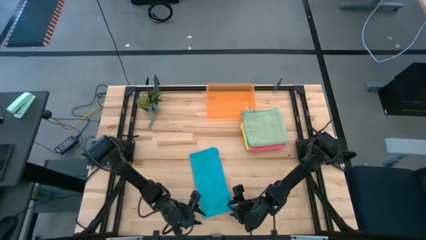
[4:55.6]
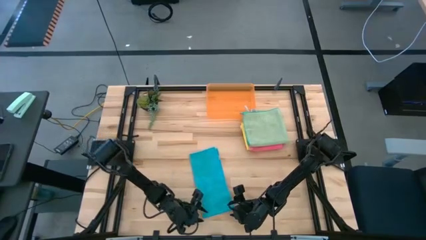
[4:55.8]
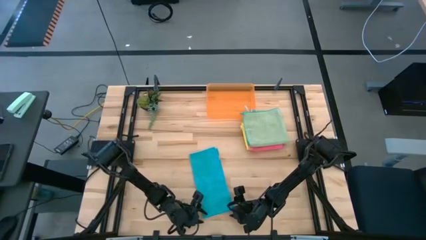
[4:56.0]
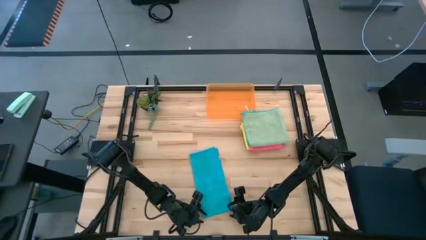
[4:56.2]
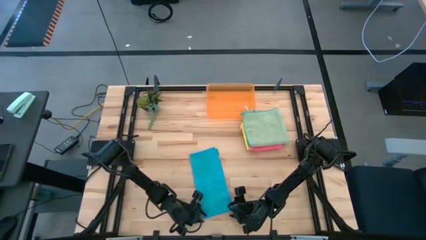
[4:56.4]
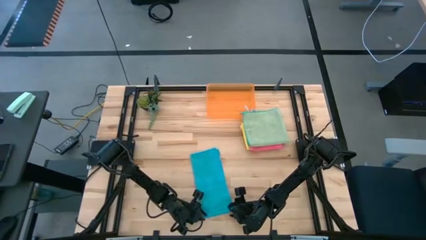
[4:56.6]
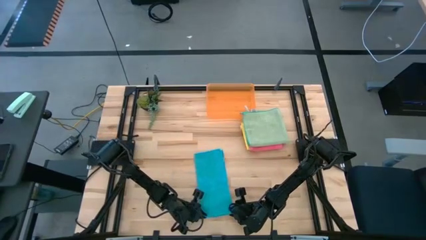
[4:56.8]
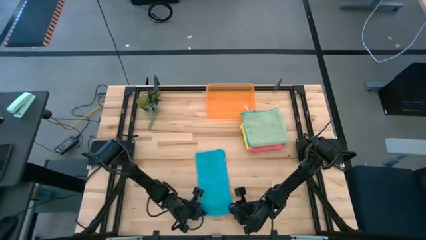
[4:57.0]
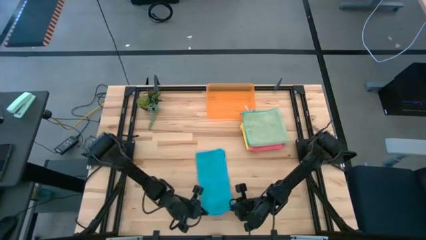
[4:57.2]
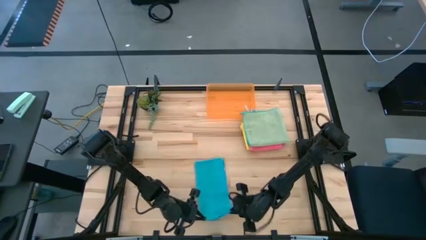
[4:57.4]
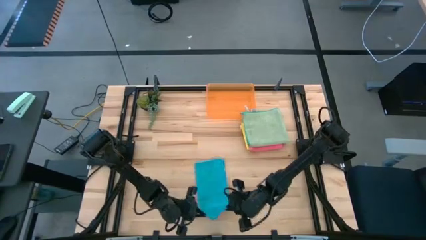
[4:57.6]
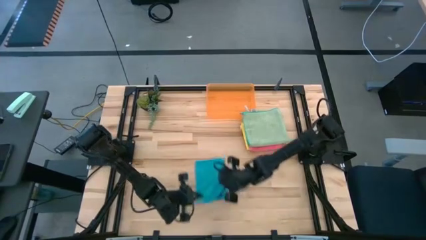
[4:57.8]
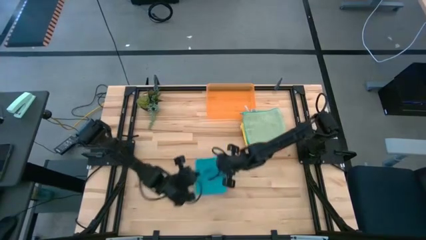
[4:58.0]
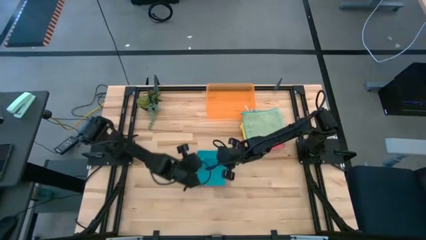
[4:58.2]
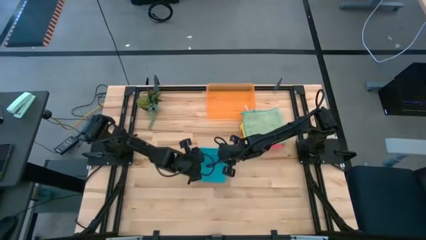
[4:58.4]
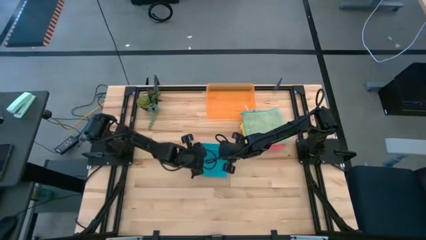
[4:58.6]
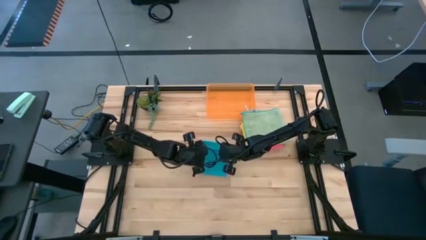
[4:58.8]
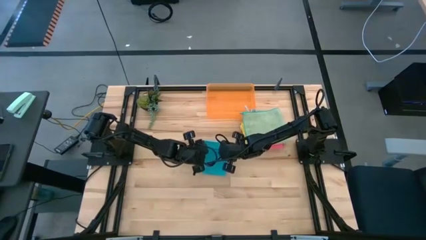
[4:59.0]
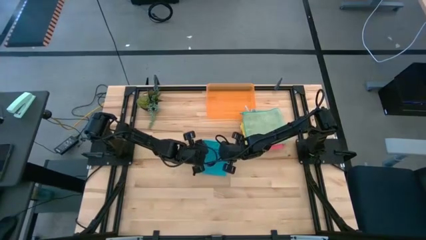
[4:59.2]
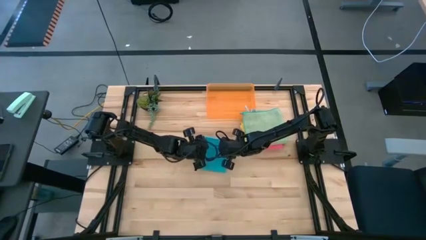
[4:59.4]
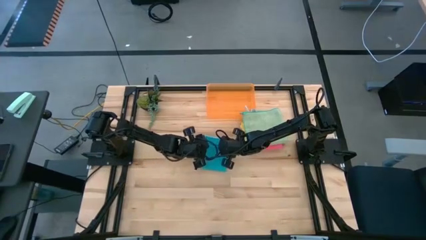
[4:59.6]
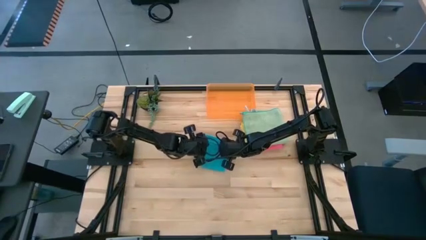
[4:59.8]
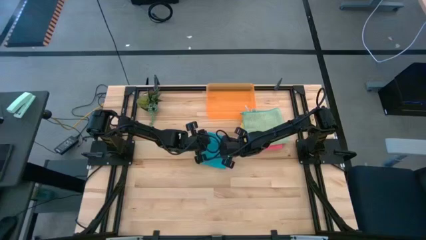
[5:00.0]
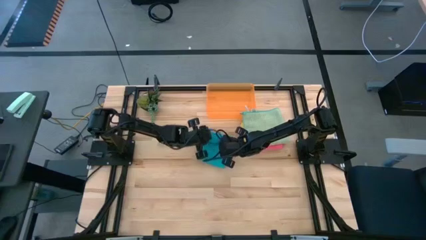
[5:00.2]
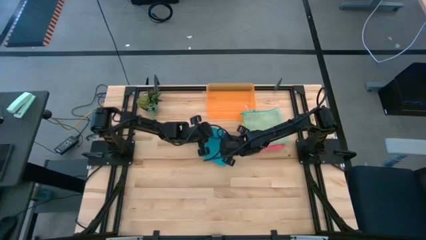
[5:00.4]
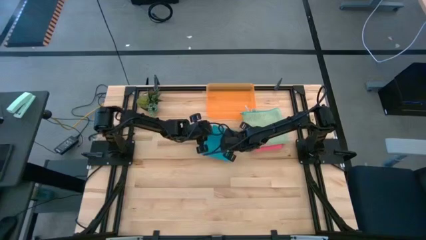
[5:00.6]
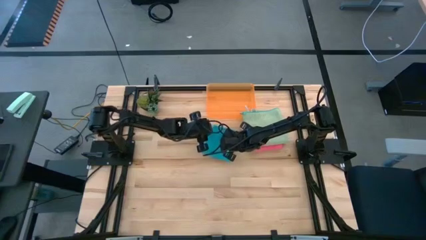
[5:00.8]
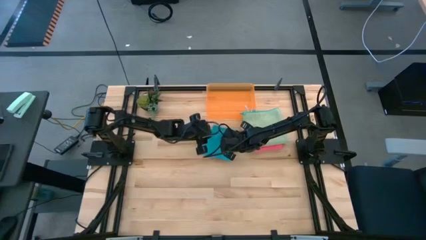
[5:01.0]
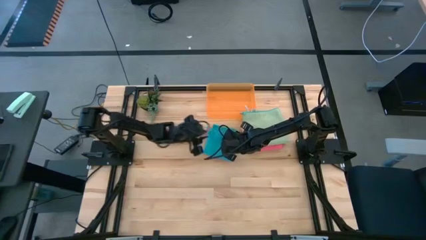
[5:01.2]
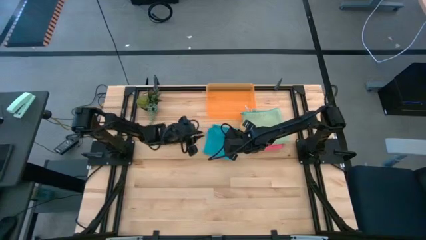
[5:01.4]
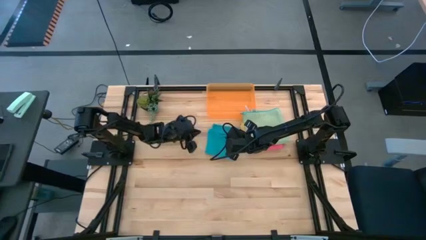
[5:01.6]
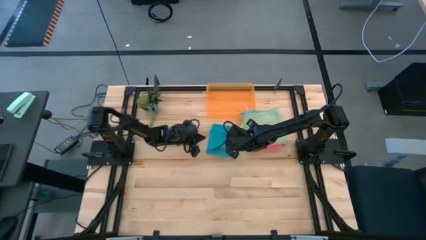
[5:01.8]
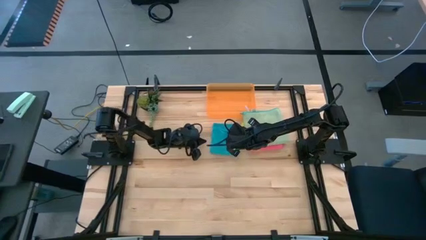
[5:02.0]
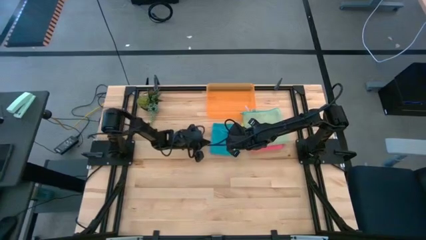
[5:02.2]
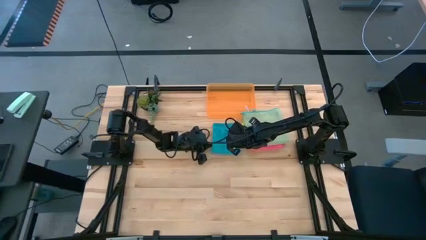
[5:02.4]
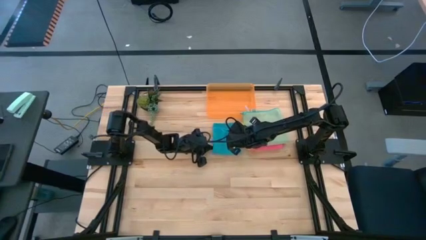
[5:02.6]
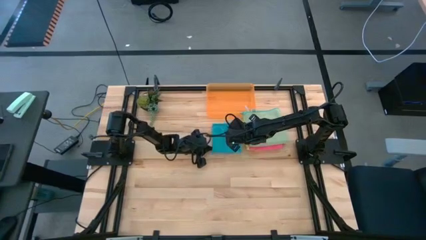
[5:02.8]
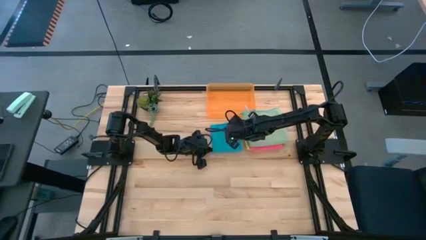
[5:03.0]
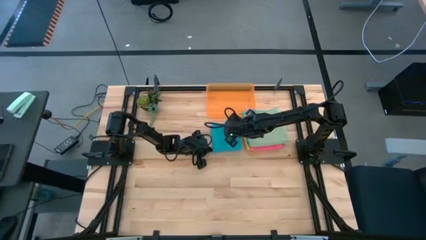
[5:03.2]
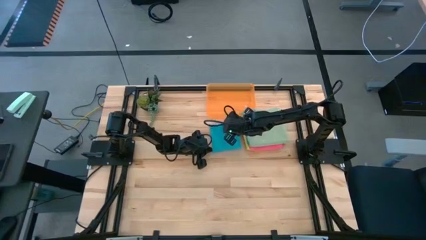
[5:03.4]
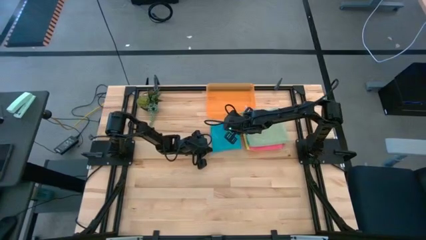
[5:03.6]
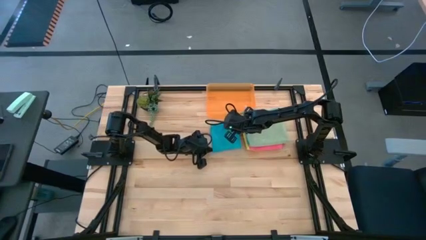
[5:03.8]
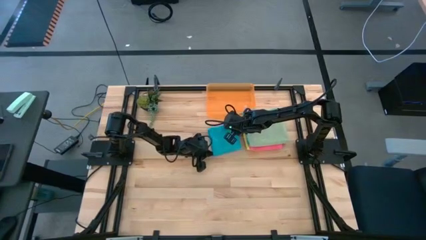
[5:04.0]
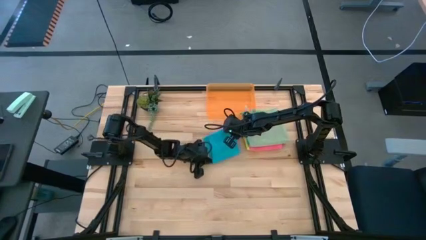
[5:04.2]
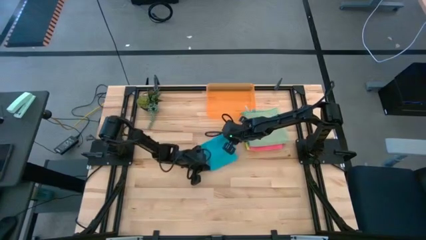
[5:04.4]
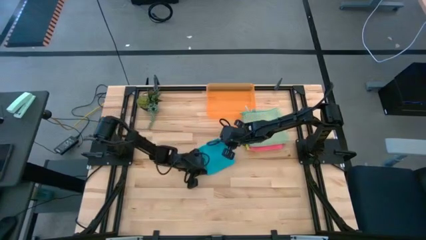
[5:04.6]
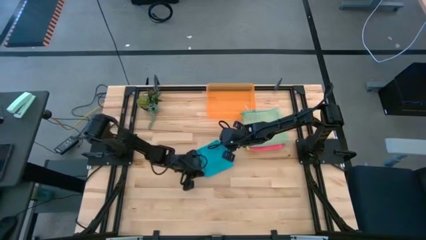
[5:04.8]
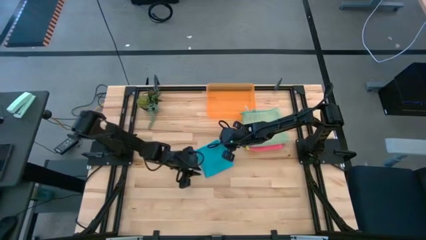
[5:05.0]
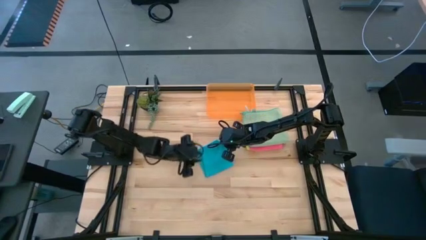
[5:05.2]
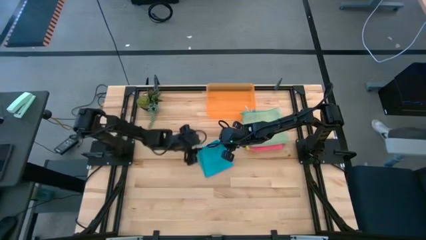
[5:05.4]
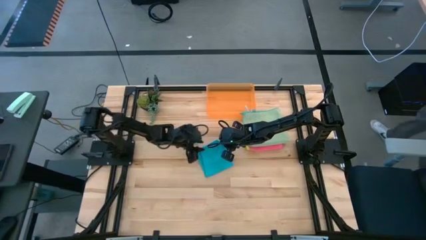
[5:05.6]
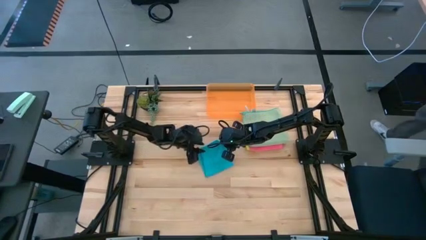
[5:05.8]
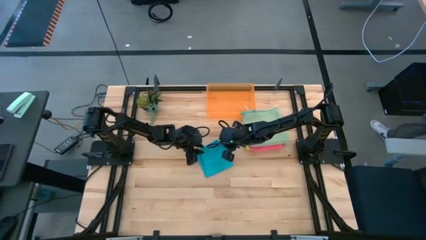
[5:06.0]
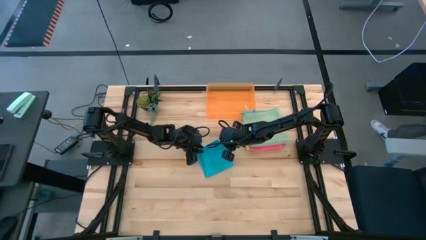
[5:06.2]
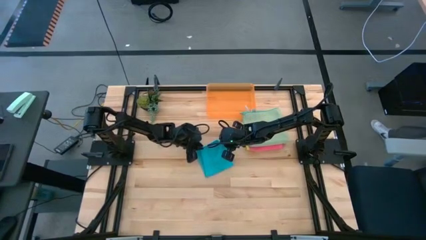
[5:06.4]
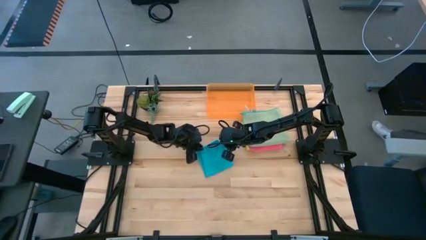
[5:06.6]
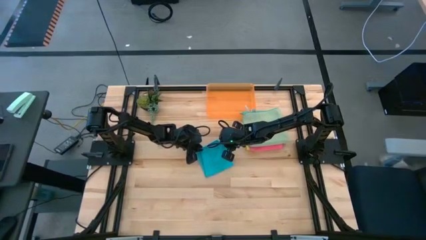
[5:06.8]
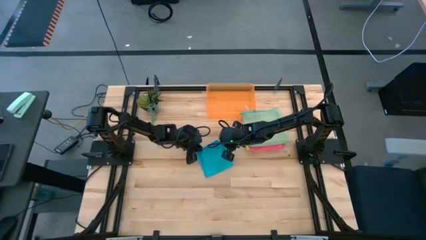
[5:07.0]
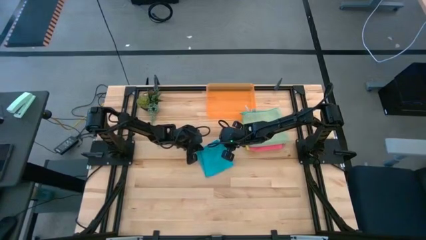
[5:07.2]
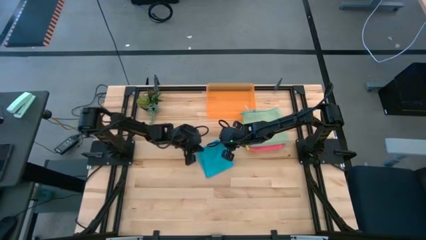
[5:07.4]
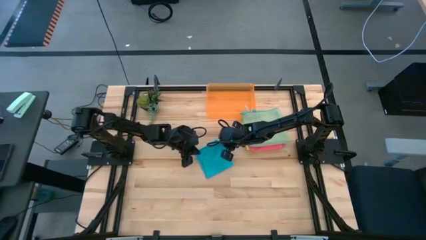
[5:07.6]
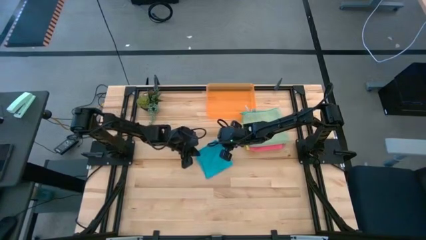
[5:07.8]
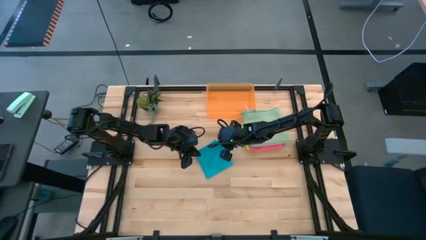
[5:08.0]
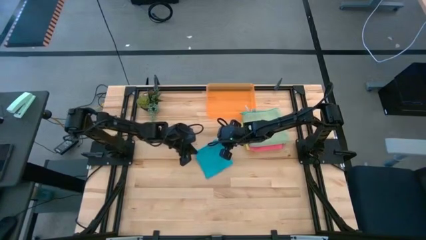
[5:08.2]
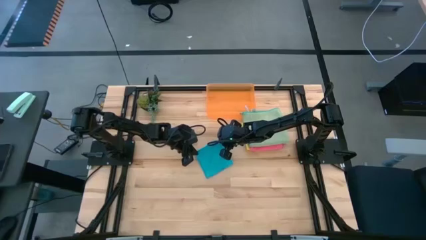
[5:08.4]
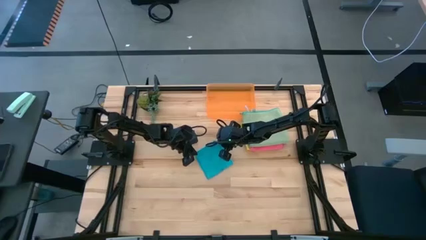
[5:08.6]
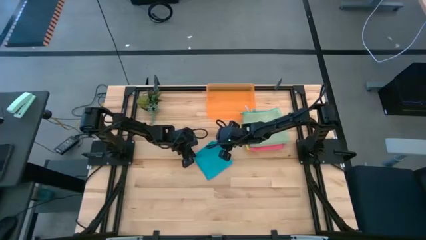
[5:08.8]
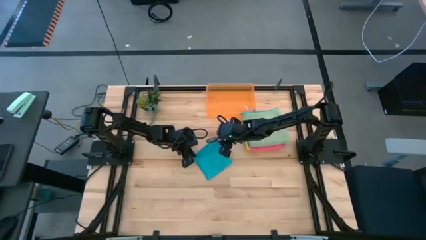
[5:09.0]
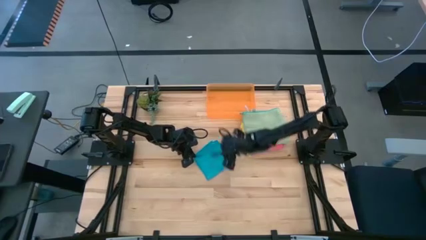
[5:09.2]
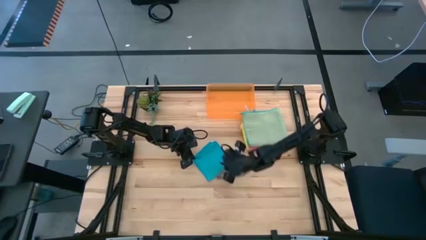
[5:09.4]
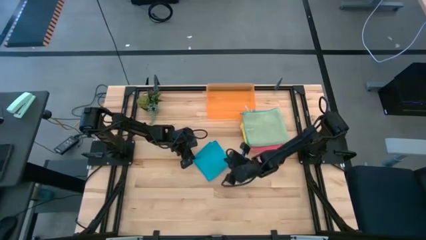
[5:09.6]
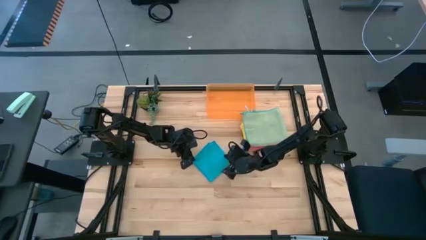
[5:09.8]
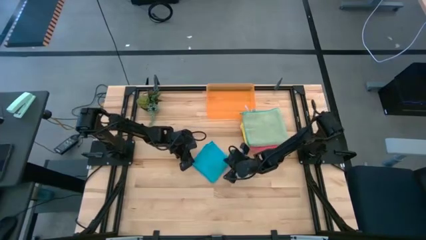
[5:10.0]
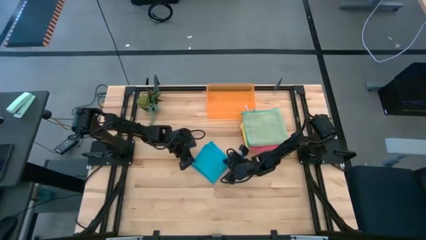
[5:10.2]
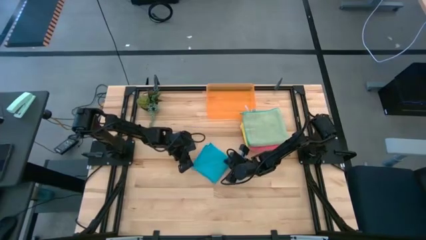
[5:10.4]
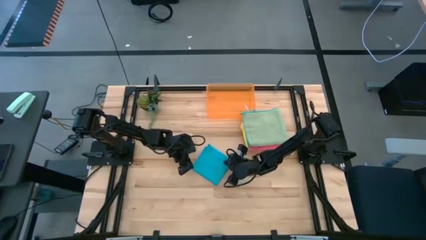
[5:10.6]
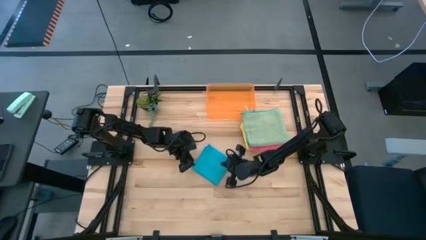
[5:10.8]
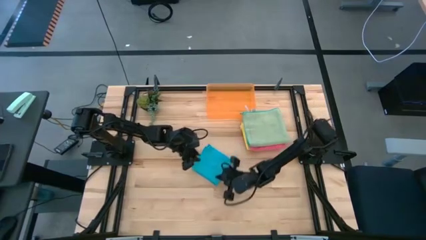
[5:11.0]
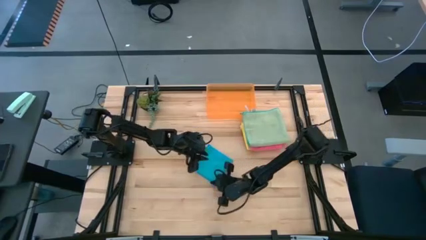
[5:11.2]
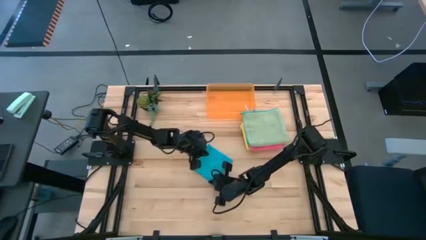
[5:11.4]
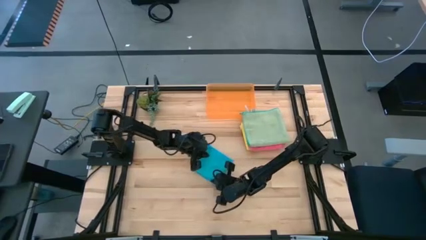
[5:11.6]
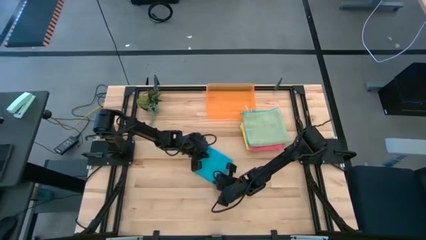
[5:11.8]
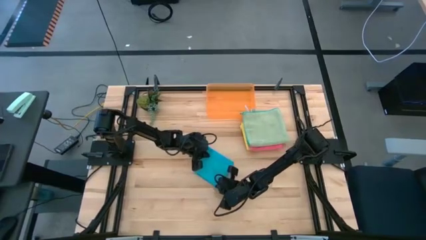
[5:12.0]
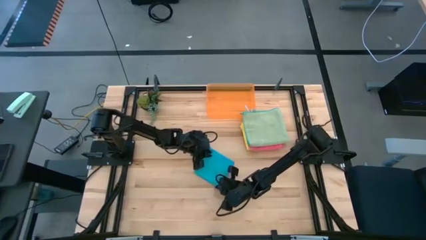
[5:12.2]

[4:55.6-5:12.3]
Task: Fold microfiber towels
Fold the blue microfiber cloth
